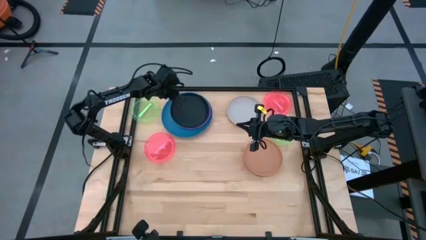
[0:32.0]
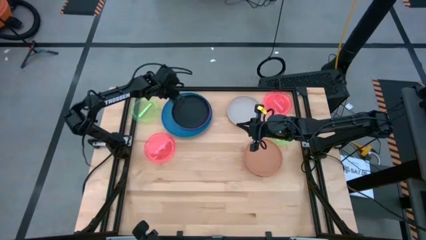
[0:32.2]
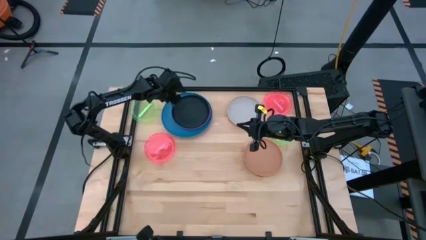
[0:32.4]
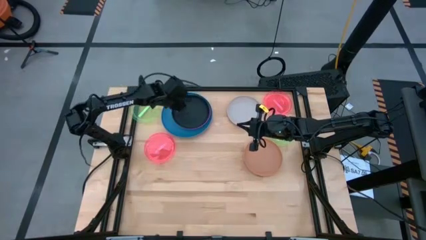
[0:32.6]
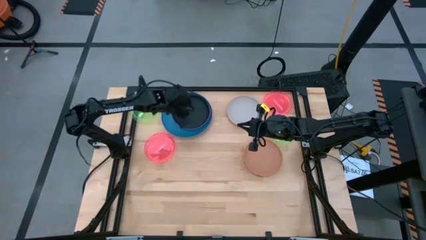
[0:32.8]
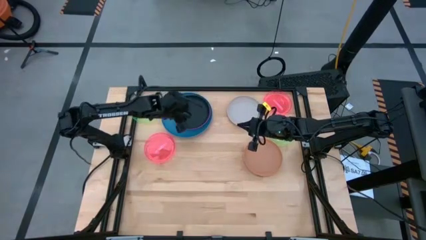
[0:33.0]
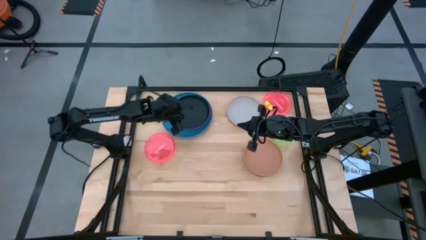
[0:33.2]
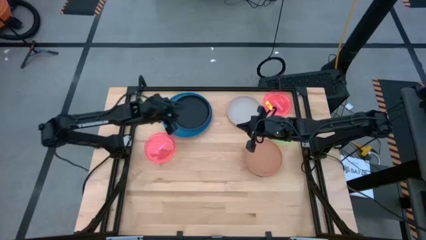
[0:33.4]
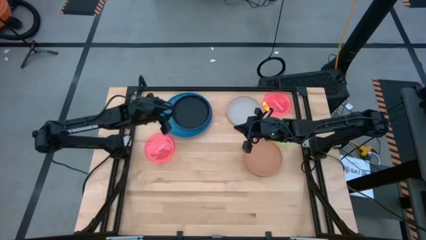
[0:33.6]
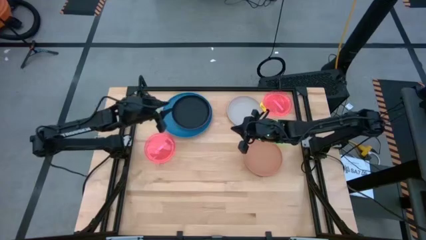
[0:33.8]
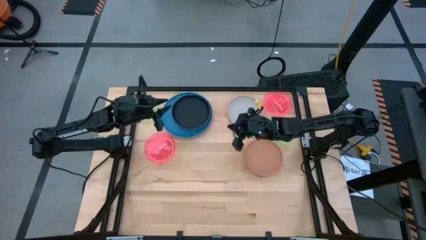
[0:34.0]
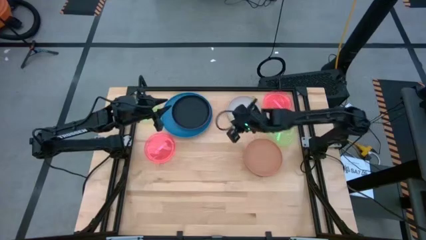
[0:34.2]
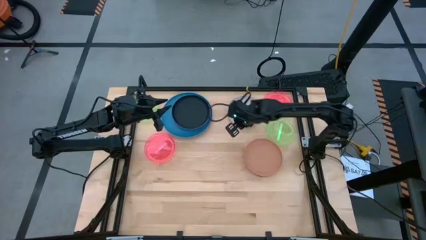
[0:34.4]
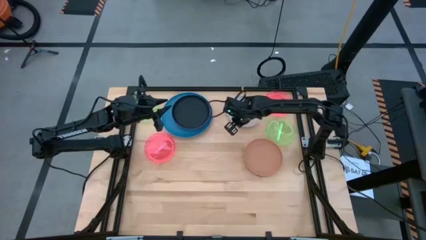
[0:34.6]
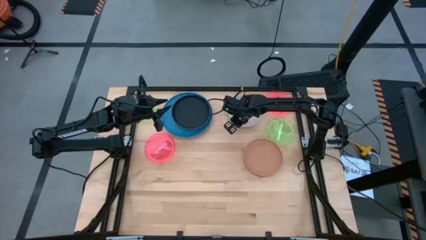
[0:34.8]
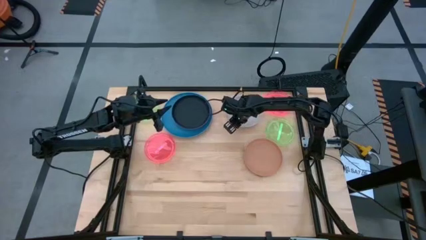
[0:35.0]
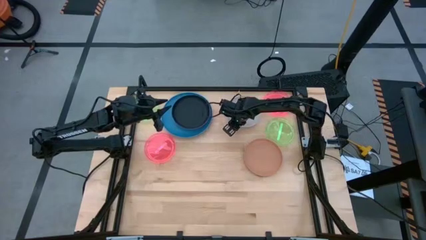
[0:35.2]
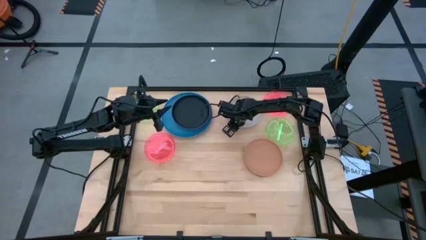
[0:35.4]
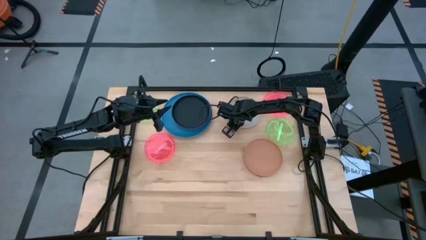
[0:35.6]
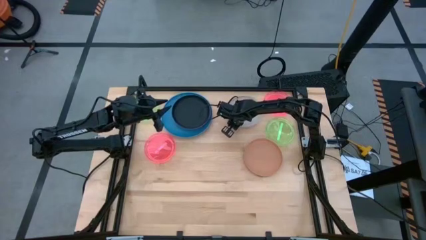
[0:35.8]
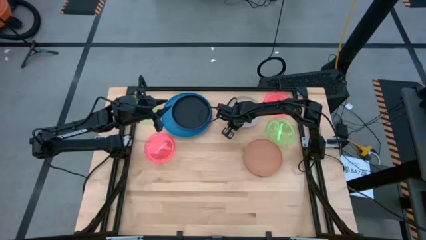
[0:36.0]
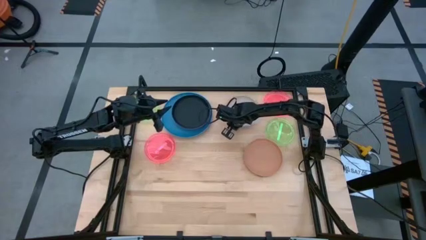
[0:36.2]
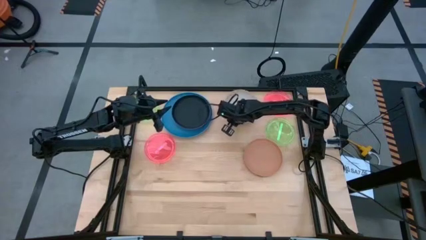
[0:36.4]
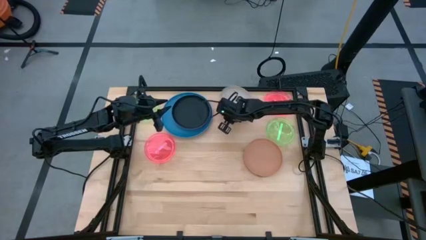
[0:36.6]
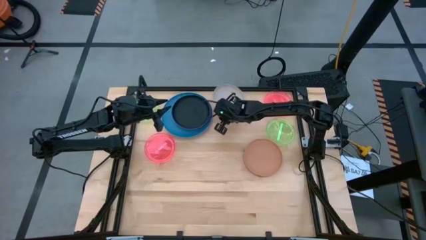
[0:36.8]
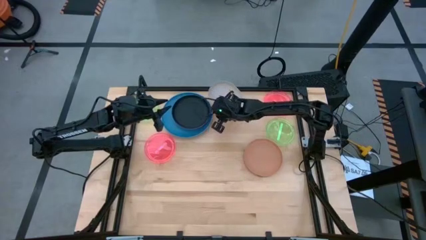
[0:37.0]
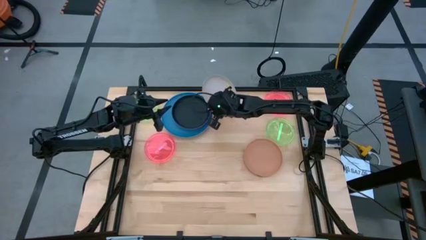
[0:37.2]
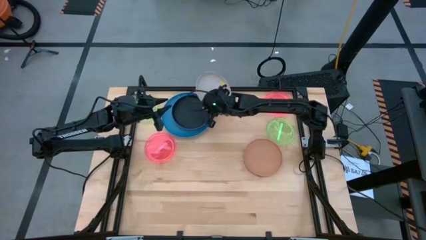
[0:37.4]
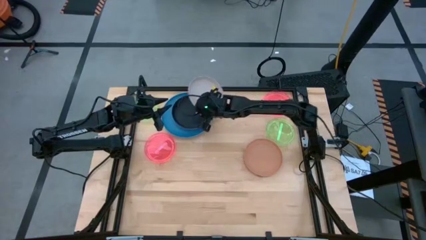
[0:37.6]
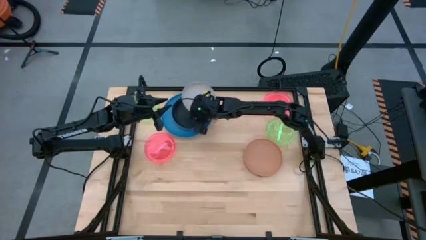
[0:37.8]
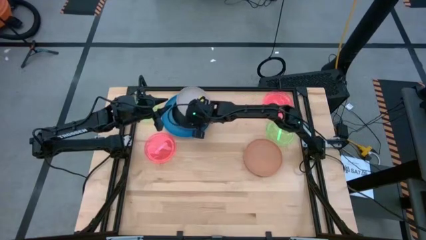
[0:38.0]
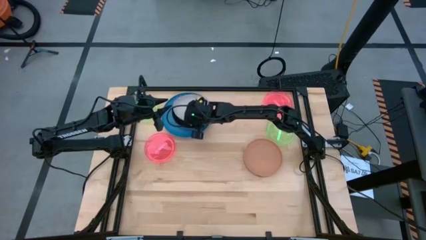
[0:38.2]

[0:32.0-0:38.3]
Task: Stack plastic plates
Stack the white plate on the black plate

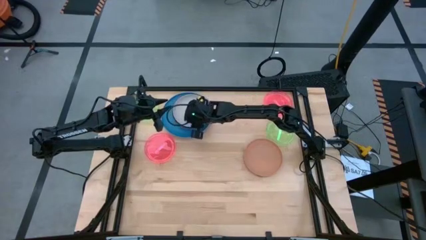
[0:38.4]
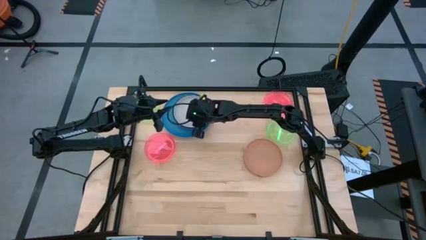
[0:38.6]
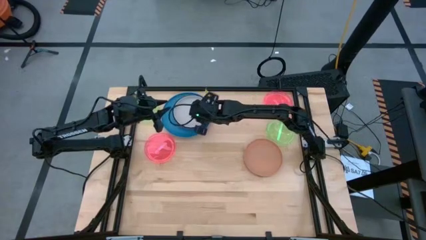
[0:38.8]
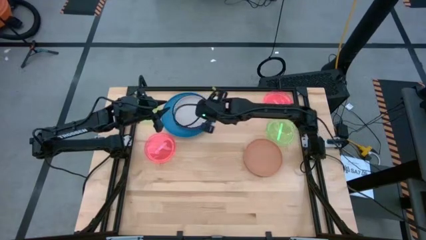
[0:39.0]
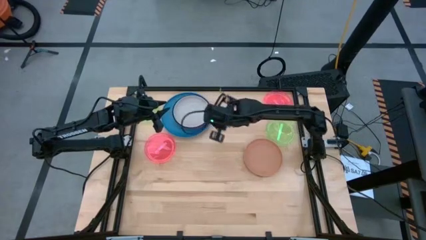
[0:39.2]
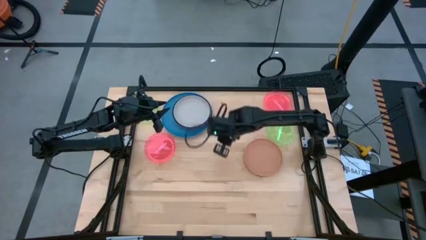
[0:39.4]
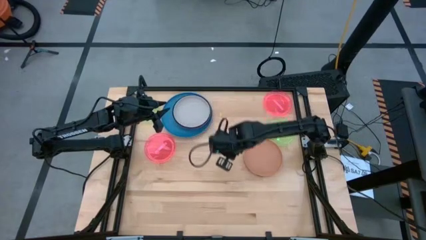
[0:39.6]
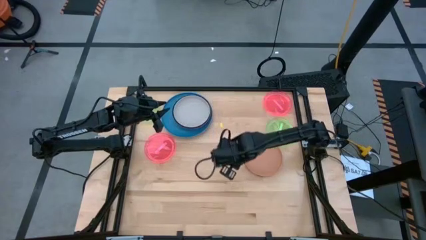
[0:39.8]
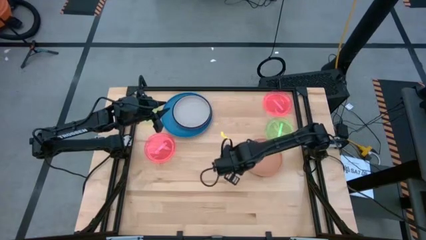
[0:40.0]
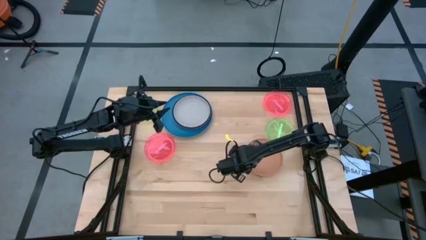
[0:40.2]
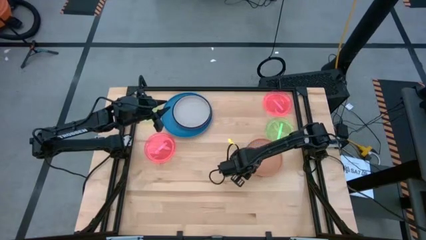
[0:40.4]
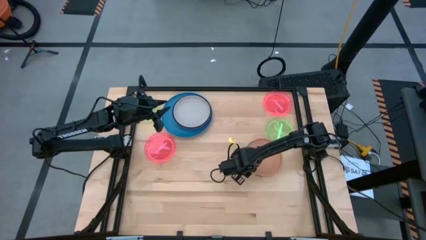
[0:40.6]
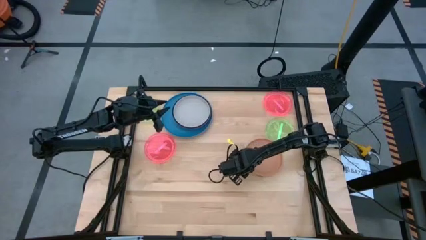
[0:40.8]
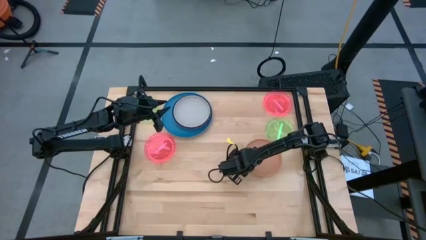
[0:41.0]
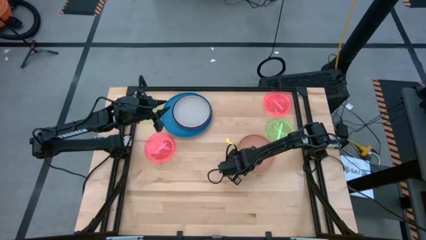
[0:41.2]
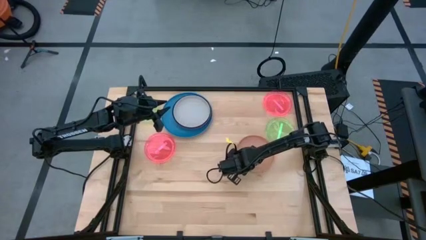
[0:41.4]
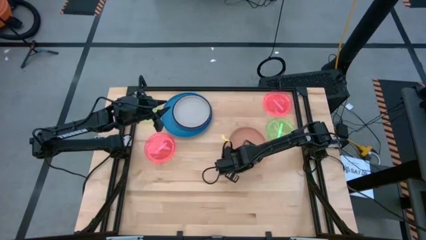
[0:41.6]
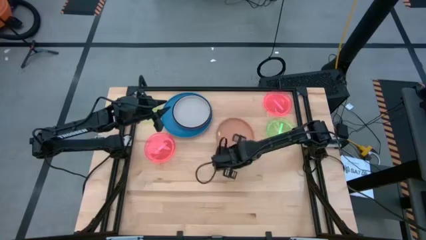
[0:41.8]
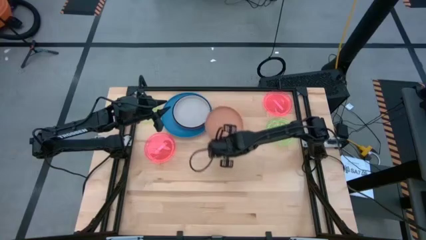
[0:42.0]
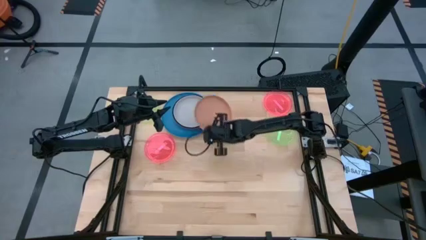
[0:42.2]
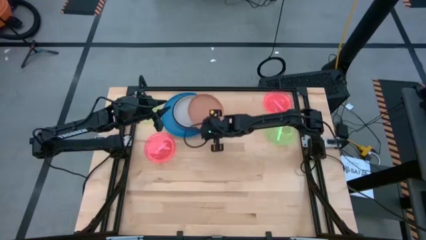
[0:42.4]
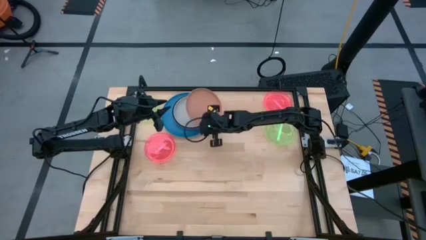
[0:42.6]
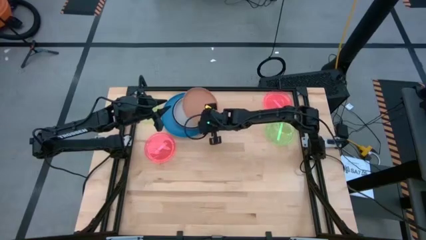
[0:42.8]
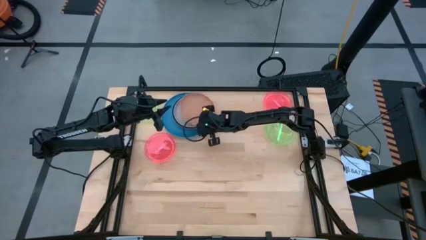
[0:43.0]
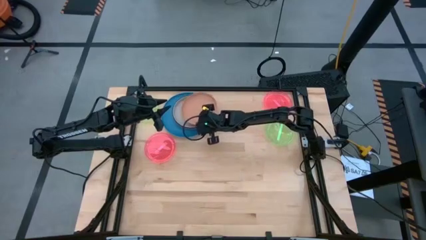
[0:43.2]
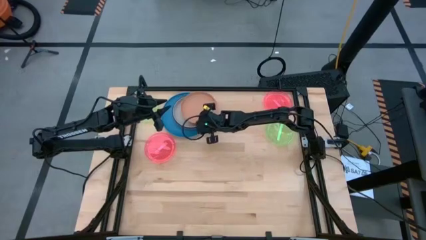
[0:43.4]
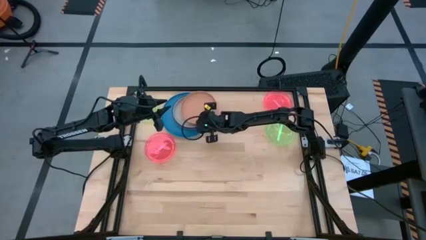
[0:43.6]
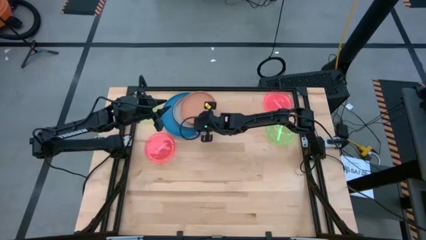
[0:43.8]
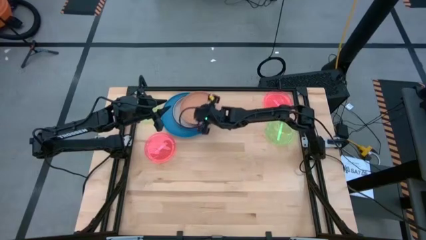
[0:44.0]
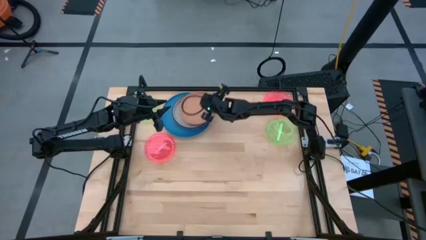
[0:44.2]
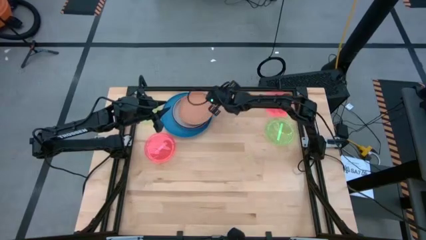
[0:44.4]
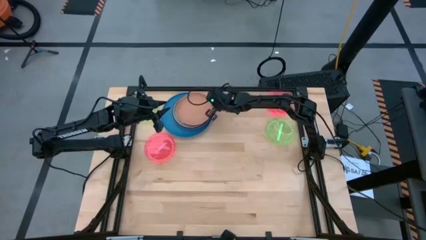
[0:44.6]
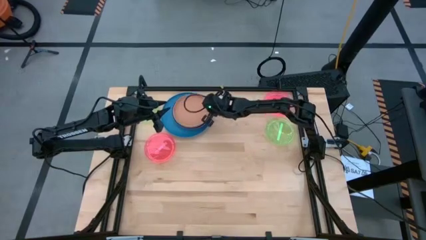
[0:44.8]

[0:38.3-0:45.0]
Stack the brown plate on the white plate

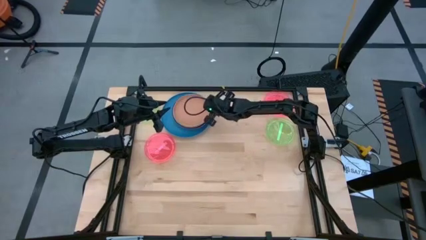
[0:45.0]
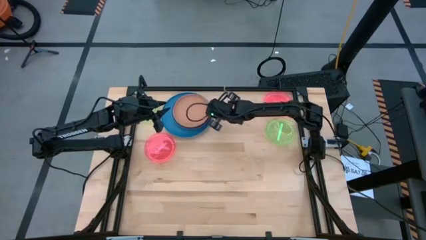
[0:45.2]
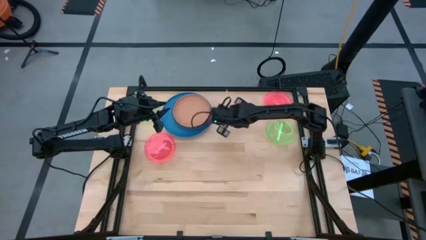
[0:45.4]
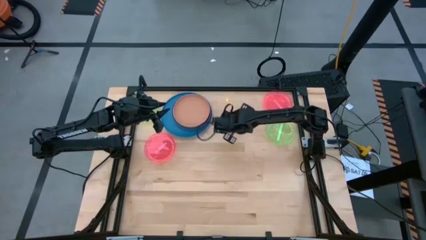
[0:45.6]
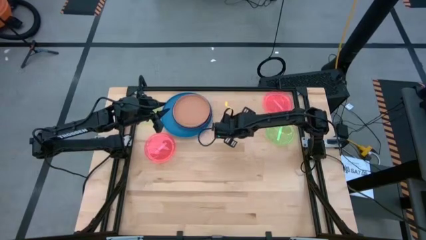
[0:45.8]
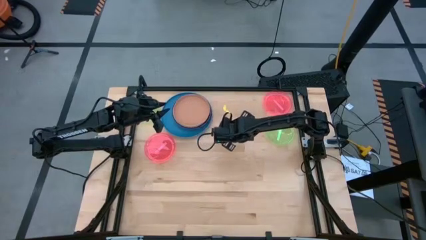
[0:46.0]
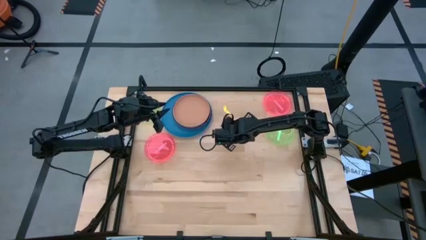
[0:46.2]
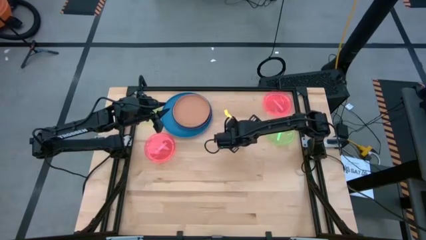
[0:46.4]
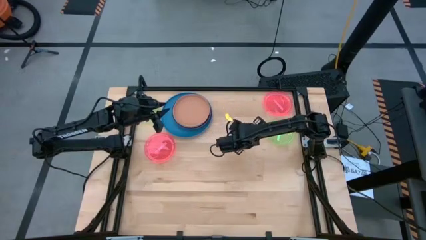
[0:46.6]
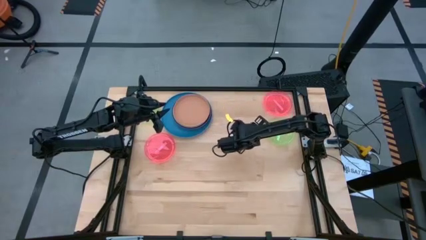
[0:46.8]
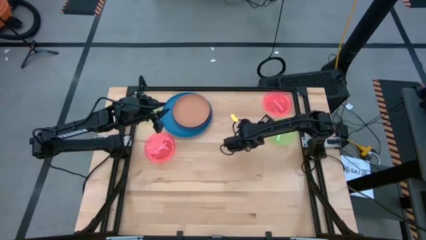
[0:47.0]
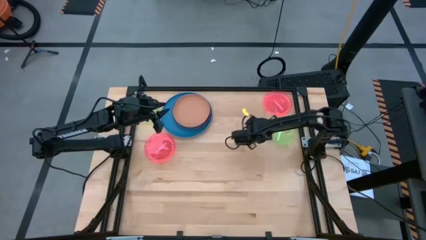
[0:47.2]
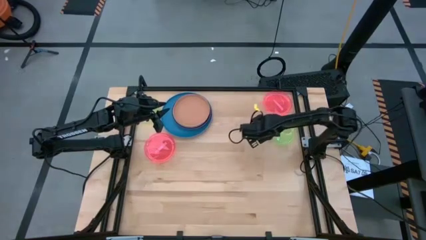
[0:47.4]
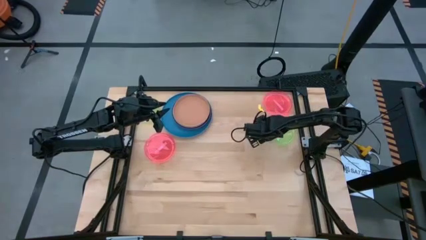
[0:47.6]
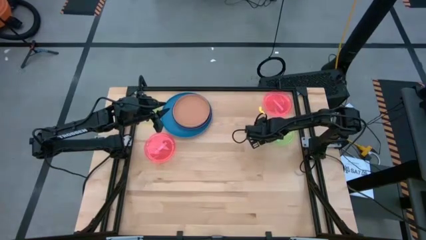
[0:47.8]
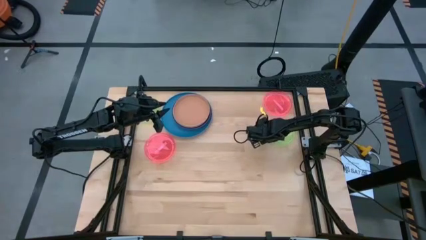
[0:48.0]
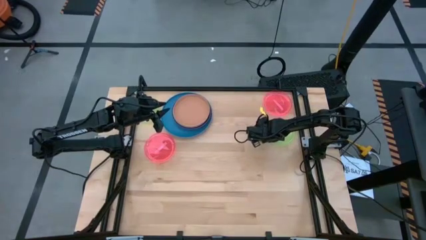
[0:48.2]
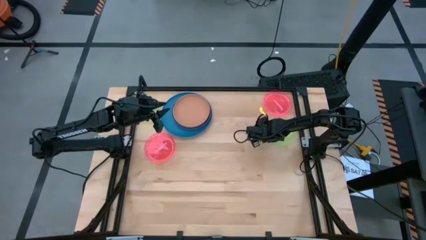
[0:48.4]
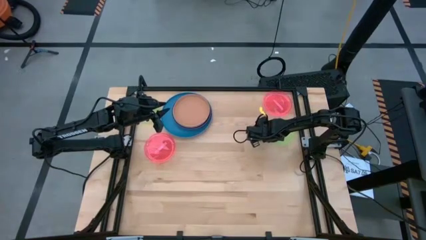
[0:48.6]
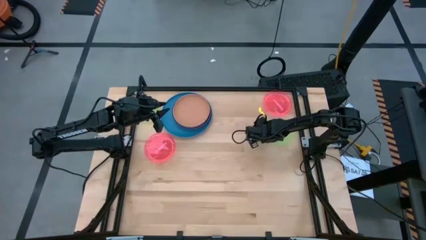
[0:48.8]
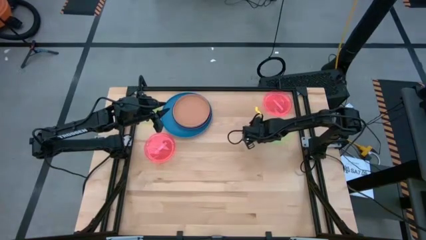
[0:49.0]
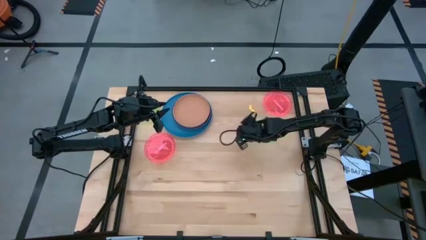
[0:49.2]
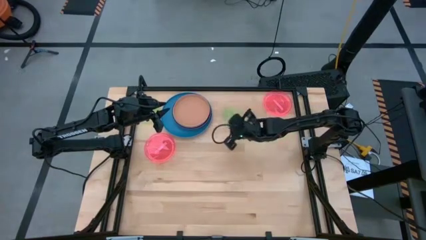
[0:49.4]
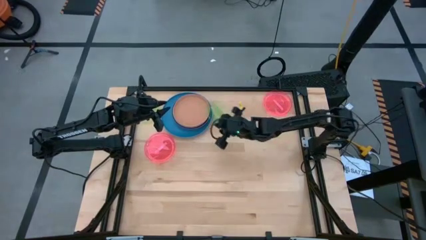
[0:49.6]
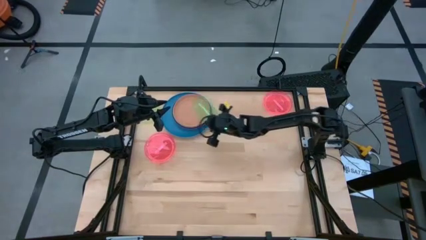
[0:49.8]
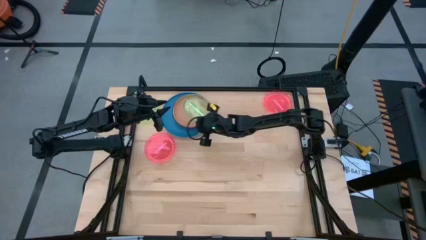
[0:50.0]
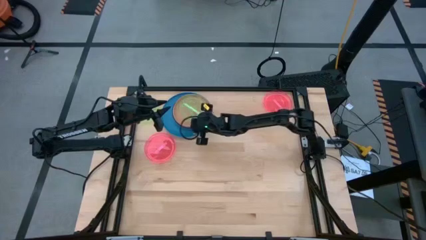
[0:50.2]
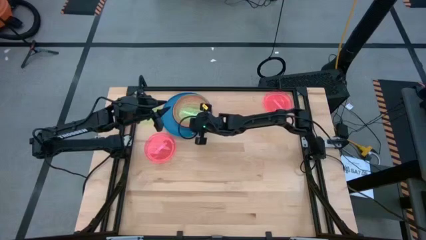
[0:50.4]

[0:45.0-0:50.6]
Stack the right green plate on the brown plate
